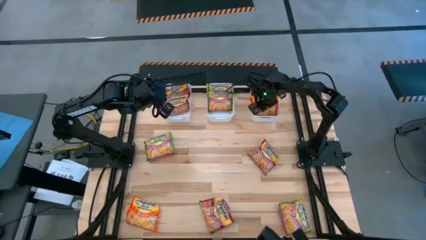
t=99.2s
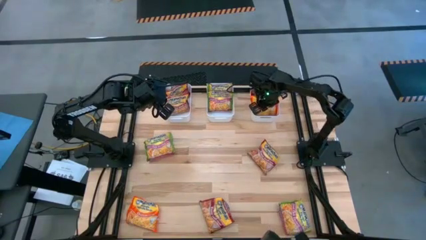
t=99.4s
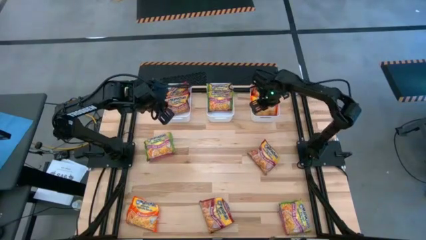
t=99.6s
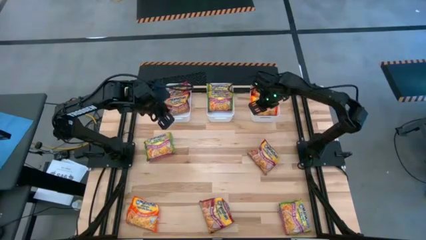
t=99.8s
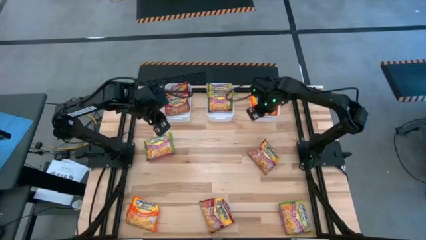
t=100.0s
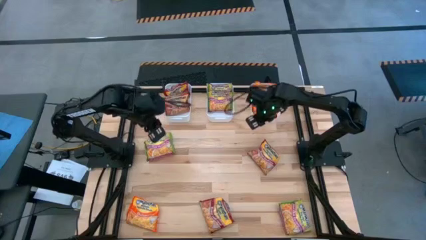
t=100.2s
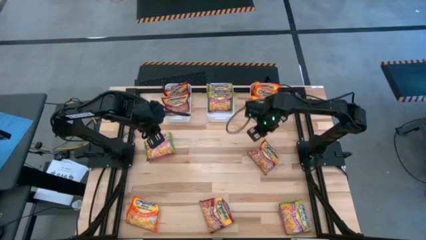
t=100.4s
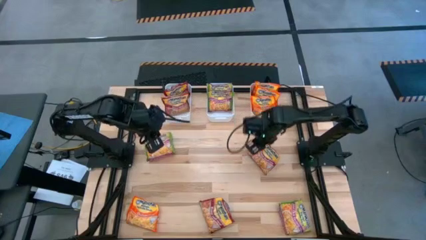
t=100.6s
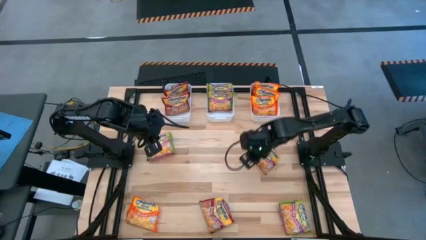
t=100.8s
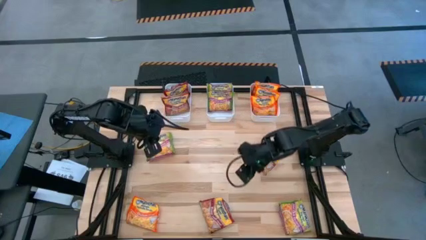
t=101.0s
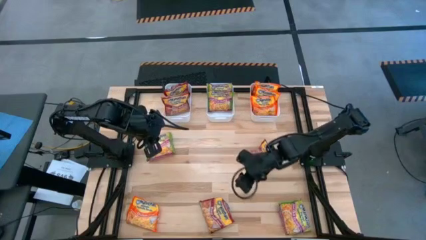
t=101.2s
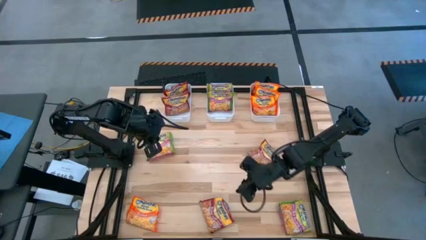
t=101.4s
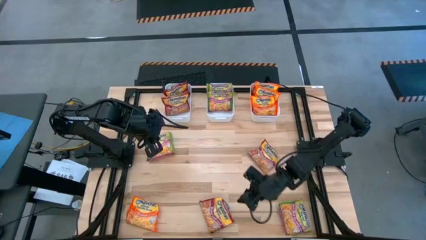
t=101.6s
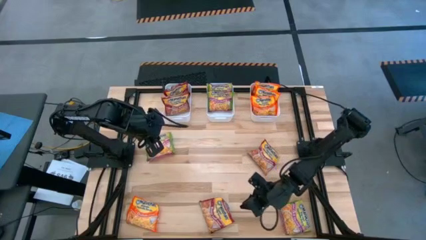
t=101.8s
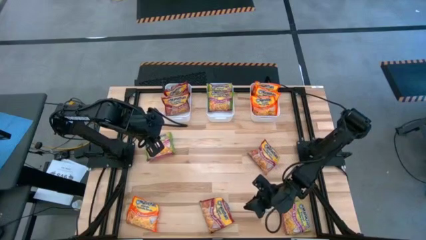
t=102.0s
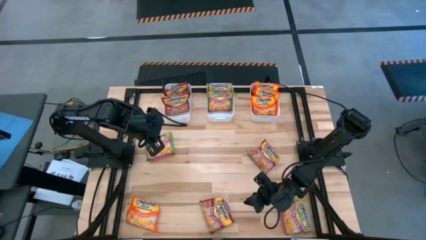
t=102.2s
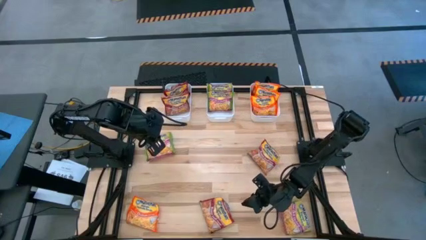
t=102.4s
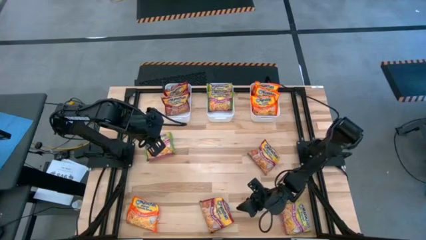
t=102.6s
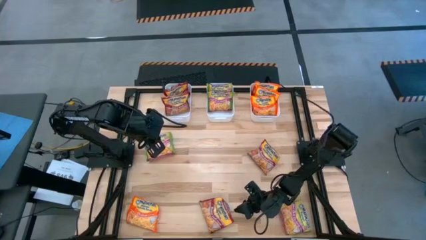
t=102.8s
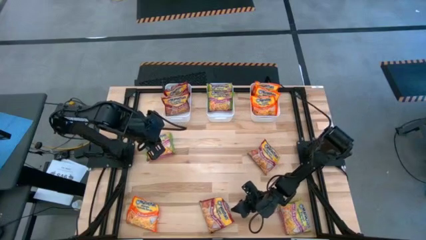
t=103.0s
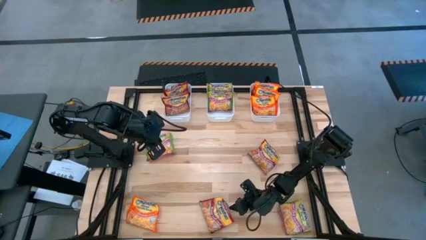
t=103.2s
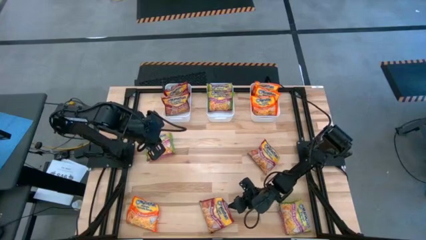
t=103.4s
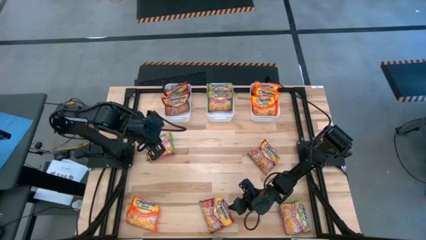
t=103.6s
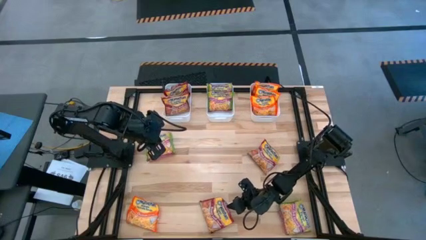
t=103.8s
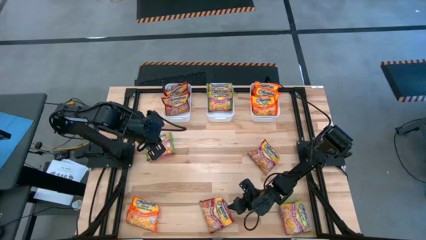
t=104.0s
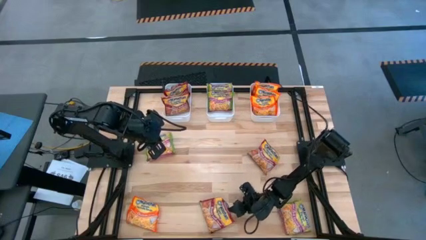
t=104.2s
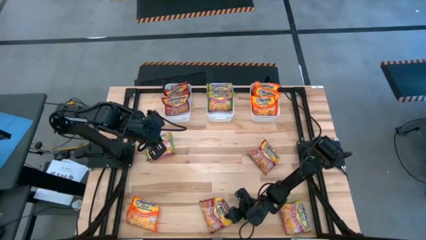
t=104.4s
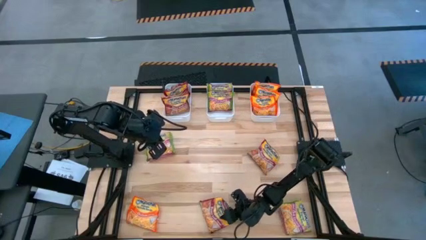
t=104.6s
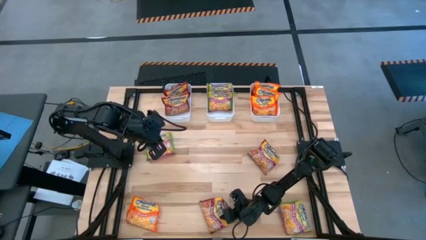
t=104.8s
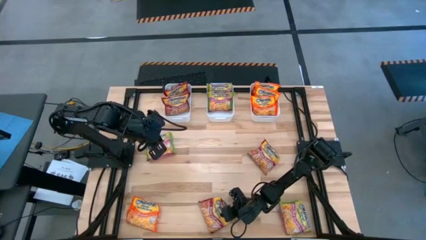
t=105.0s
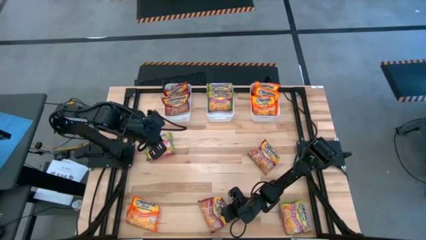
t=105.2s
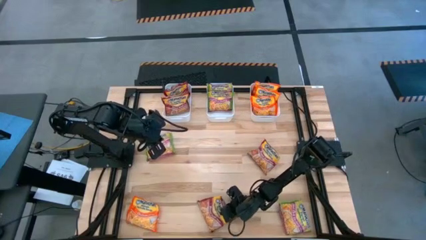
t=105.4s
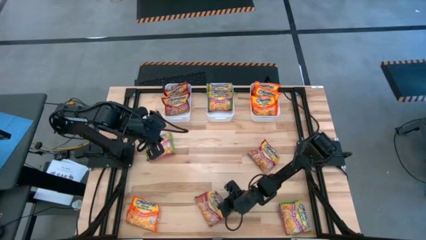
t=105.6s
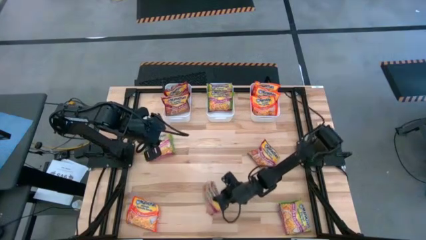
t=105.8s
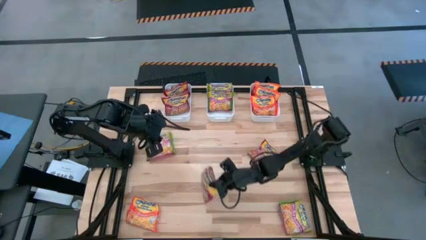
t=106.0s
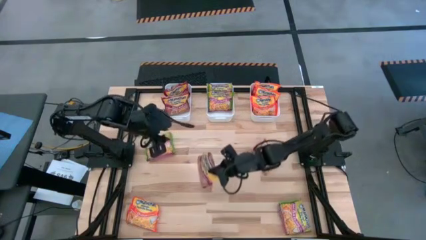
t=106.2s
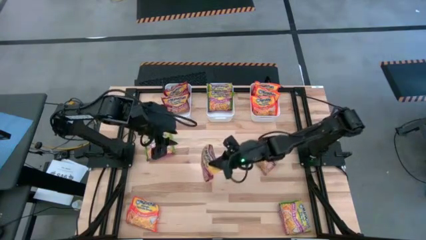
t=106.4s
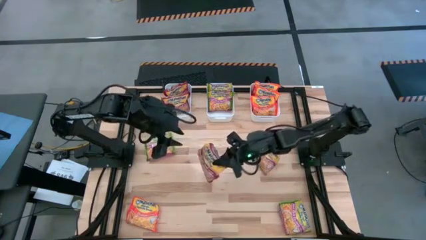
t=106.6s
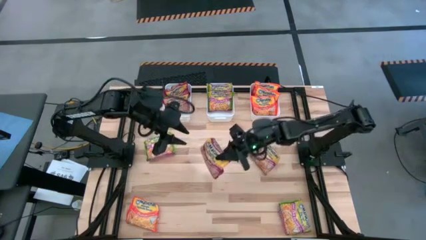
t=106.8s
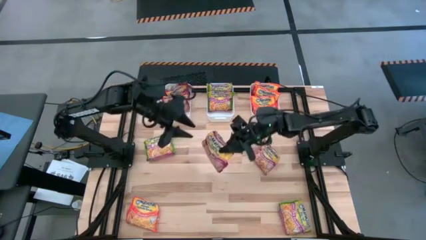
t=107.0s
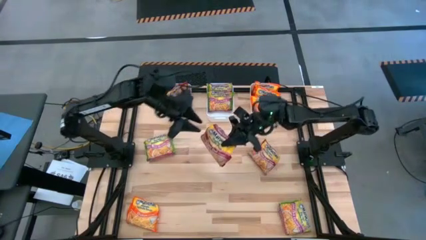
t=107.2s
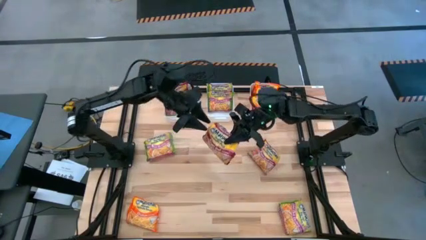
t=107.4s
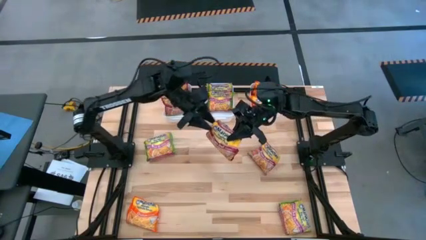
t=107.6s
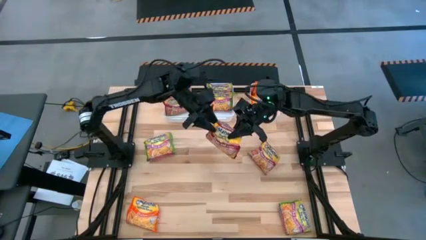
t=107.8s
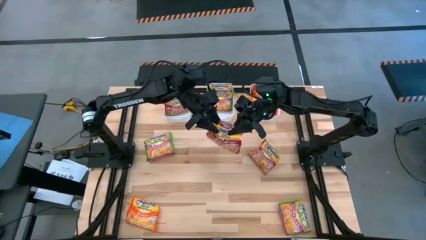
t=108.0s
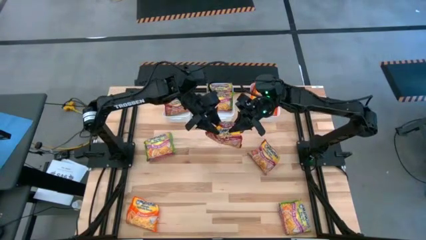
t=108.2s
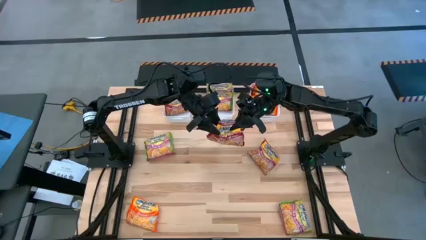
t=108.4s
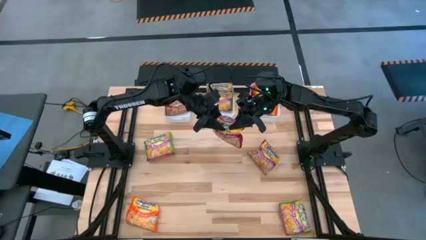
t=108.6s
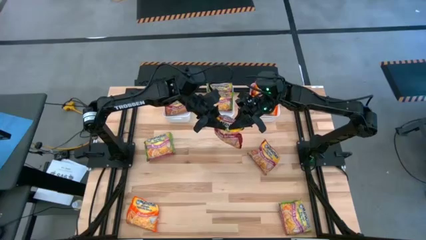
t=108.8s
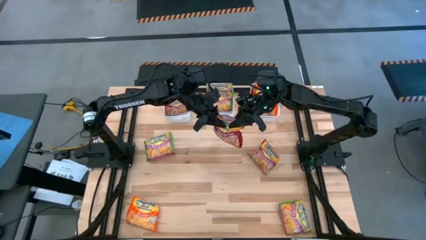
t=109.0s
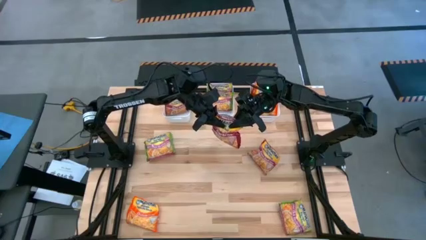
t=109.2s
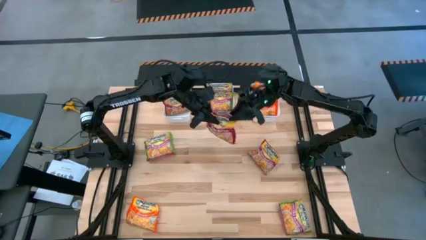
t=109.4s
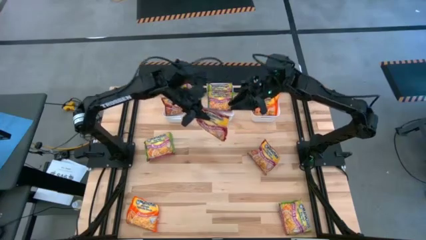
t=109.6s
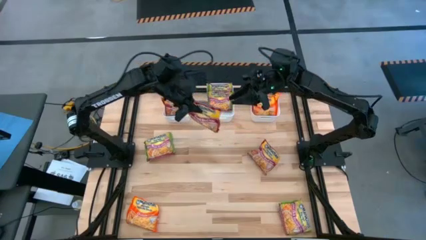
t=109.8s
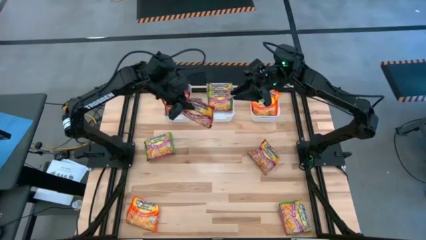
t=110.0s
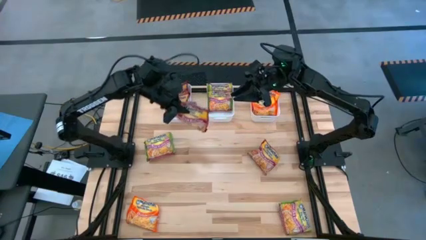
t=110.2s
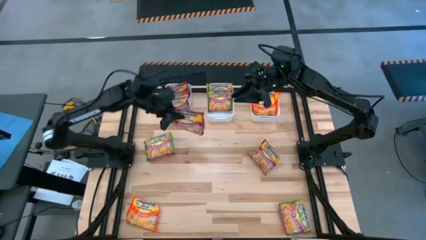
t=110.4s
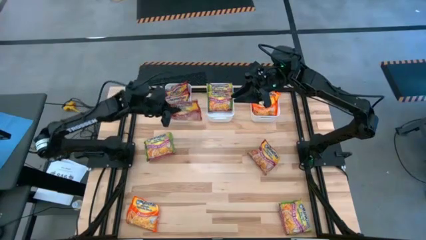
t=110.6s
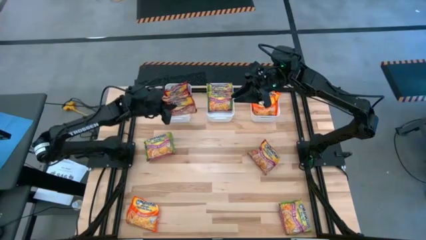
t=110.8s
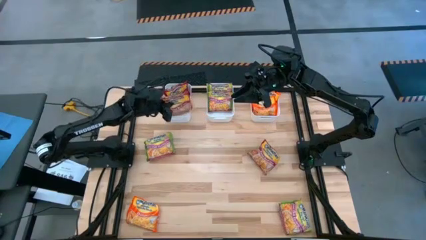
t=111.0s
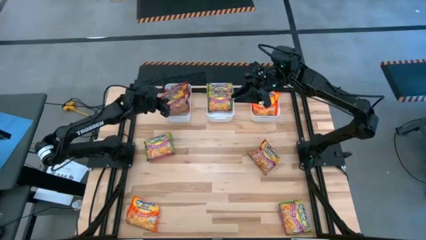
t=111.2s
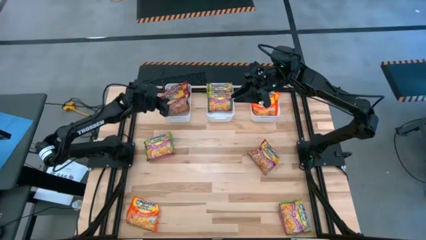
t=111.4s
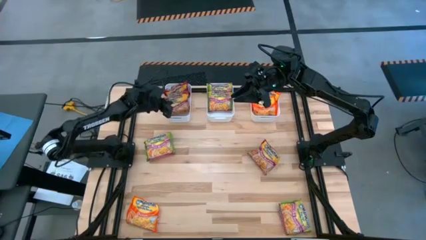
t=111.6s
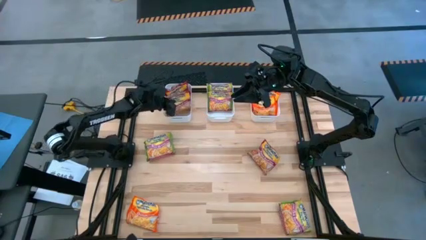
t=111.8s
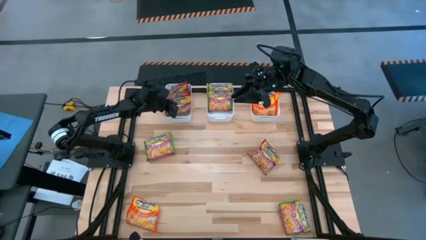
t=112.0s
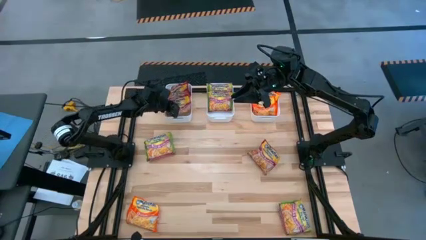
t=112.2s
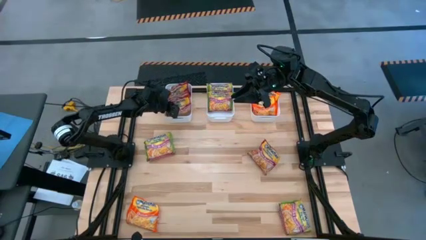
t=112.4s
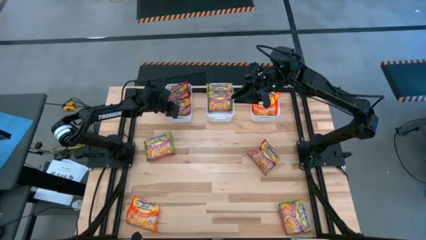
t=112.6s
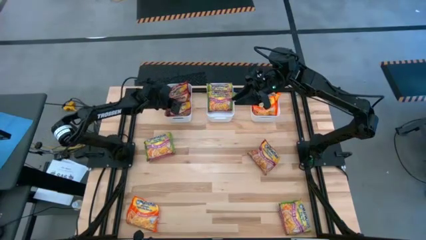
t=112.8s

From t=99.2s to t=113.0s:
Task: Sort Maruchan noodles
Put the red noodle pack into the left white bin

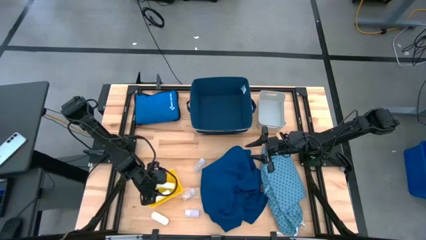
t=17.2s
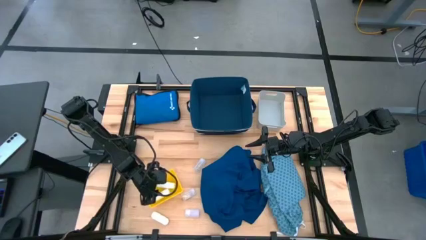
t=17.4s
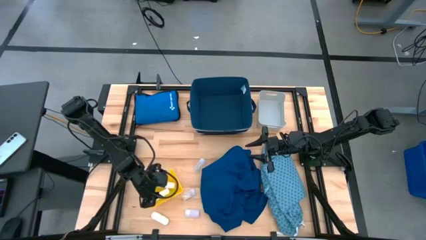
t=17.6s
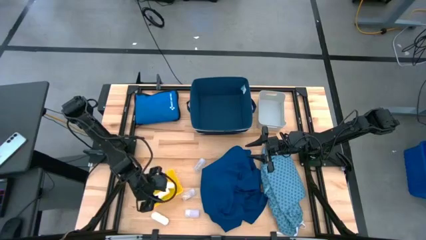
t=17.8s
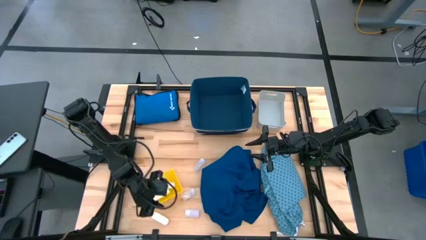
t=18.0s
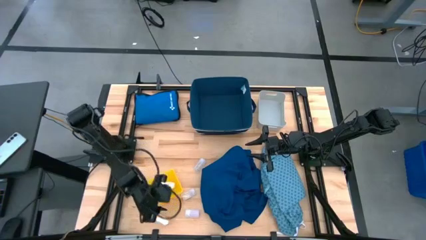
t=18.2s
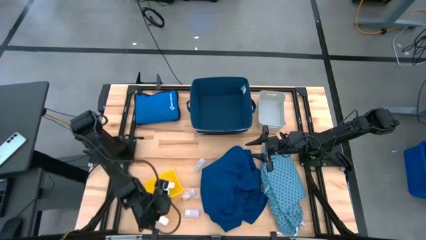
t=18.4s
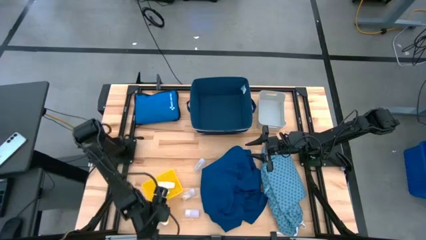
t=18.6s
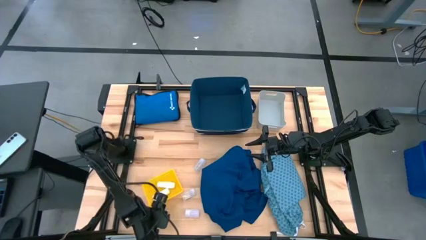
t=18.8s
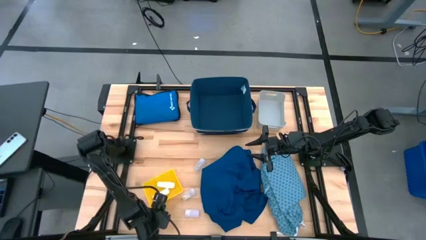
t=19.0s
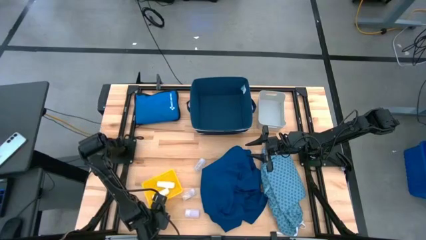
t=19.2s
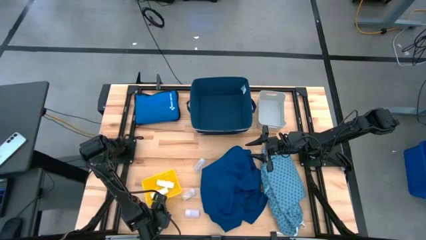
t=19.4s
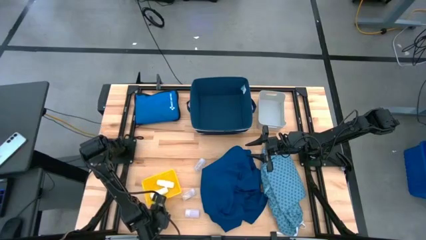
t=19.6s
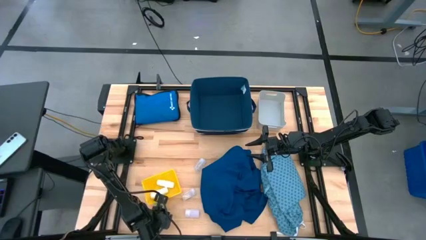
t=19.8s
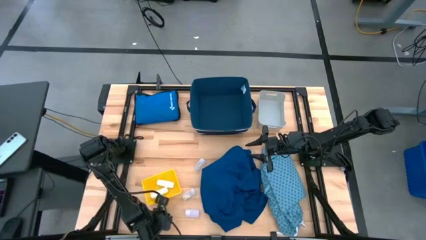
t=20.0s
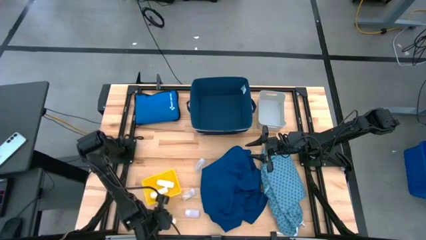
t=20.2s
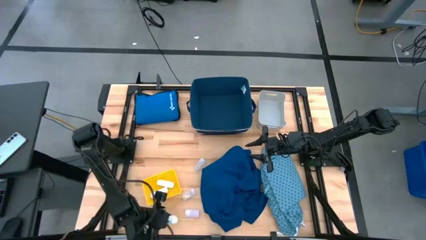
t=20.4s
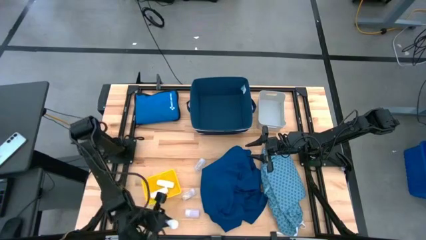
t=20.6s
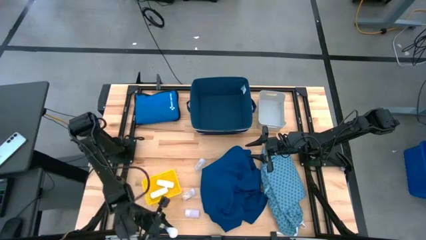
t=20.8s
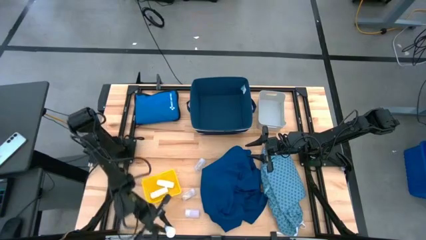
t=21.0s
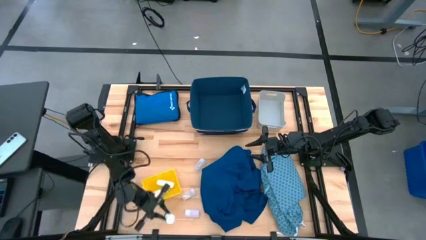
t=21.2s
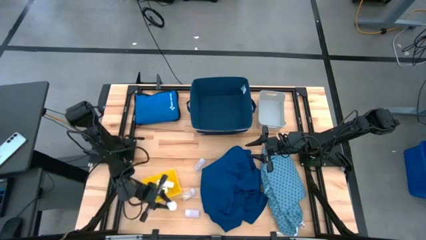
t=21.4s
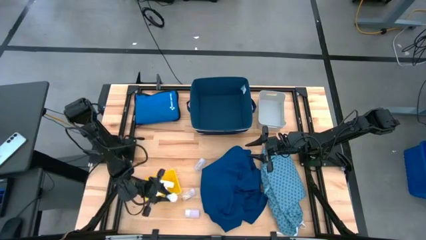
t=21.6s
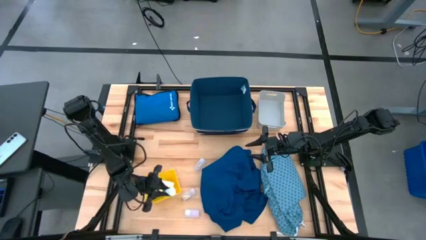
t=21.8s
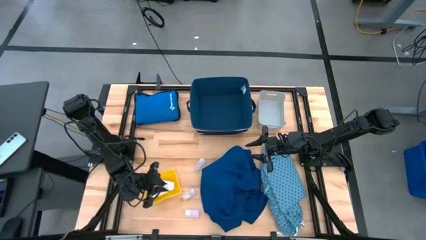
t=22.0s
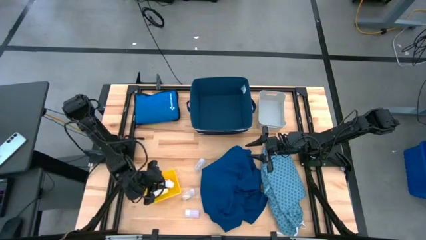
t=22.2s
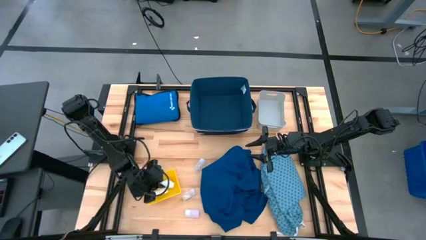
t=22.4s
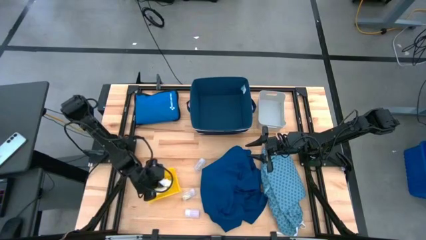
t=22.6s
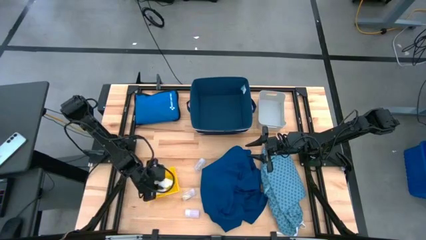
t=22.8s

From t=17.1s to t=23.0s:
Task: Pick & Place Medicine items
Put the white rolled gauze into the yellow bin
